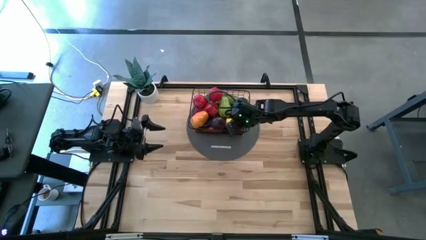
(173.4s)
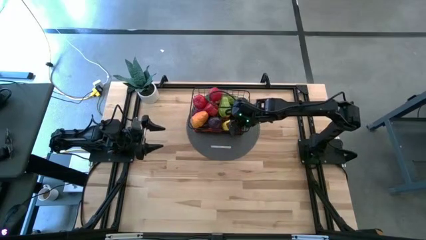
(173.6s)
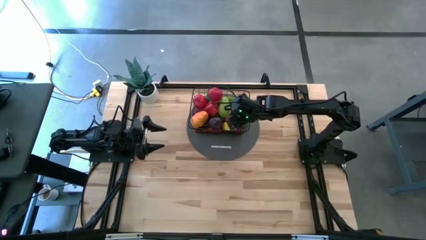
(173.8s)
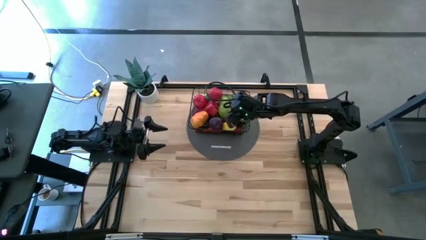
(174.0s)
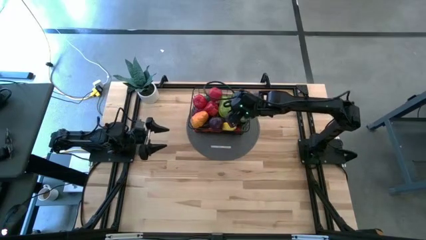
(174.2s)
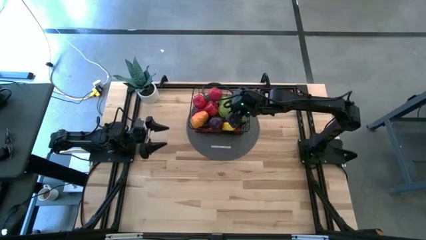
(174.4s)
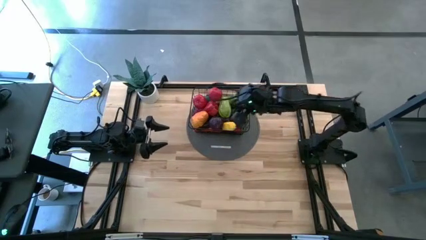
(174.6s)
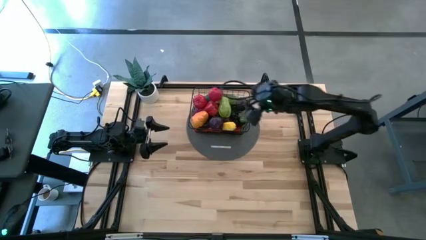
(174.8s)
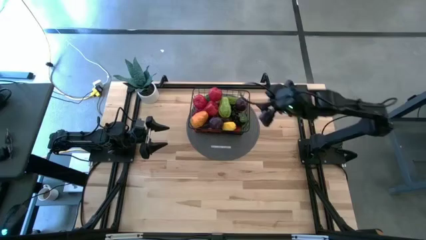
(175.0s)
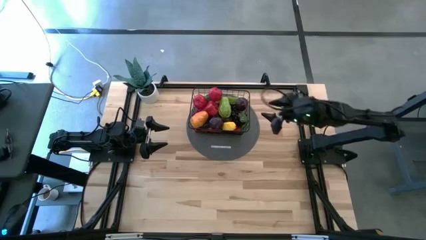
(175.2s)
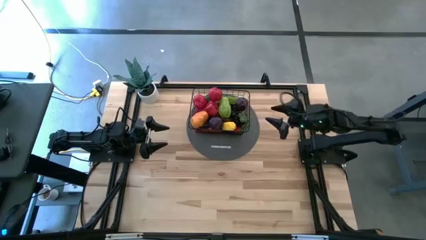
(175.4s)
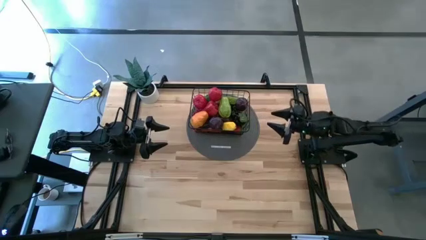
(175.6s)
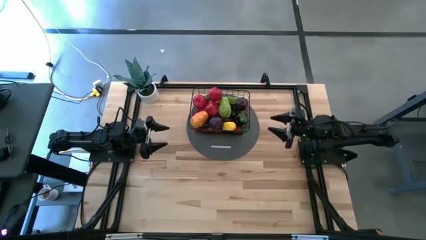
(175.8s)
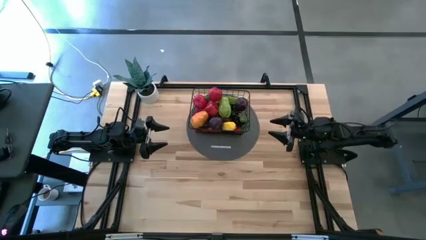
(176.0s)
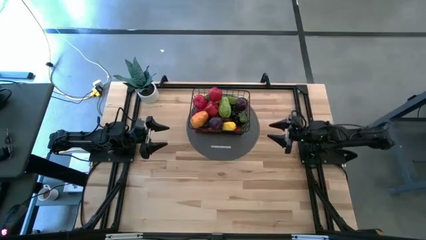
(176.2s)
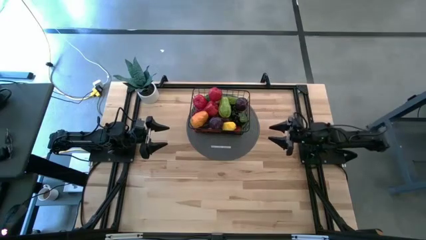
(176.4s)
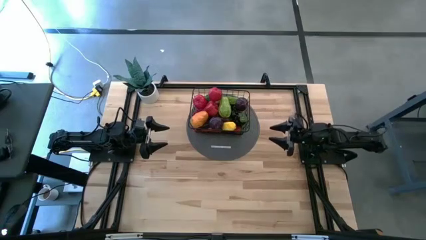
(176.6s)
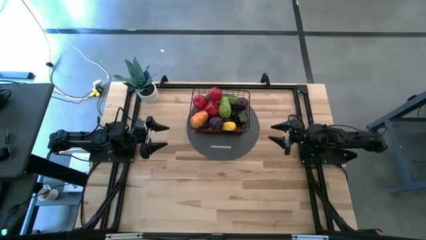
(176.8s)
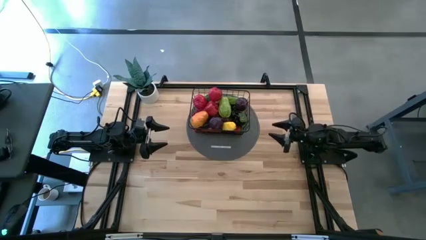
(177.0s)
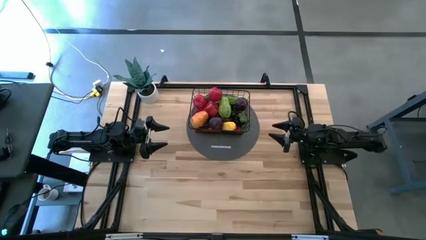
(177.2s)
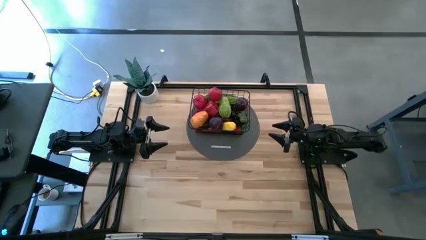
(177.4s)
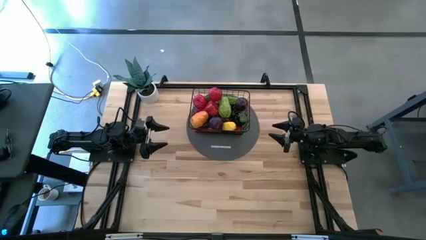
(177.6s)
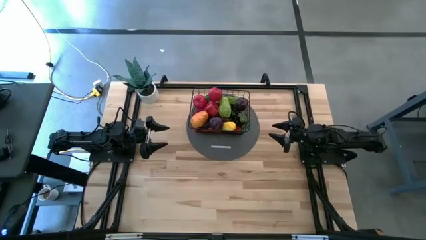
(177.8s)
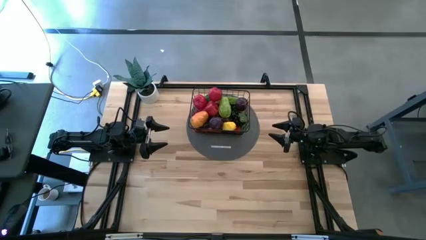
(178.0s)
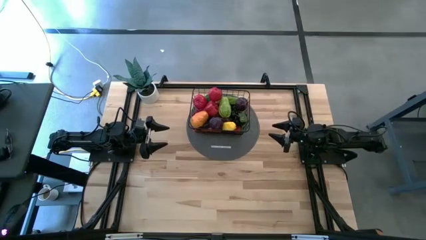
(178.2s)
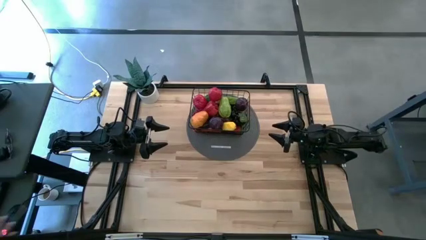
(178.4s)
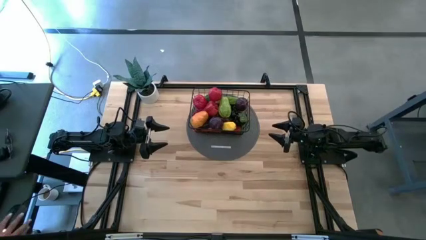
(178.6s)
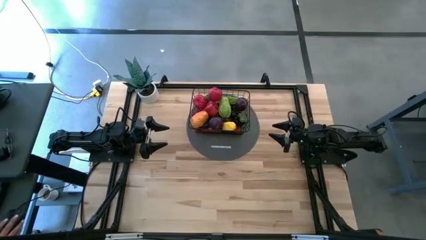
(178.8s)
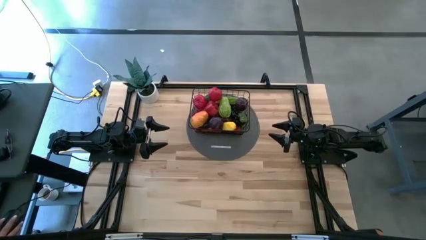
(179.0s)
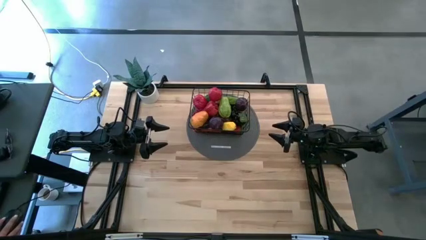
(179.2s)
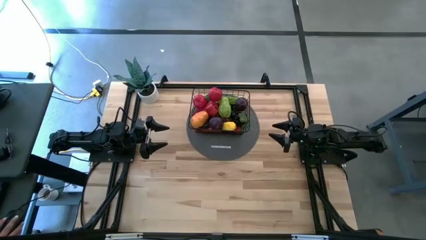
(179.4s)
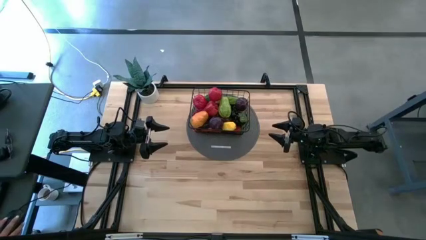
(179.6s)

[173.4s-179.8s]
Task: Build produce basket
Return to Home Position

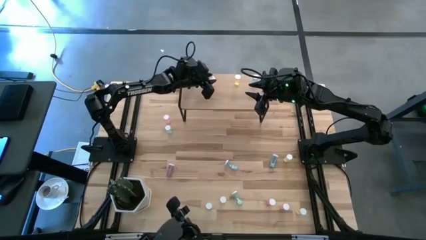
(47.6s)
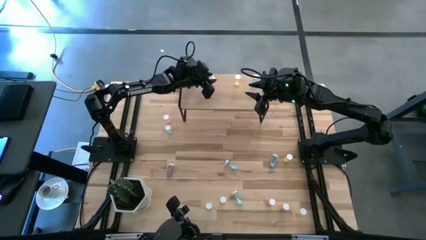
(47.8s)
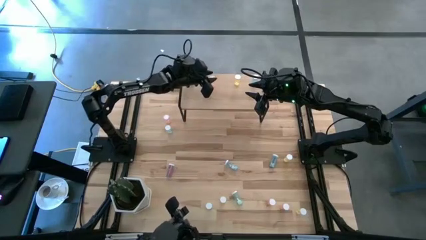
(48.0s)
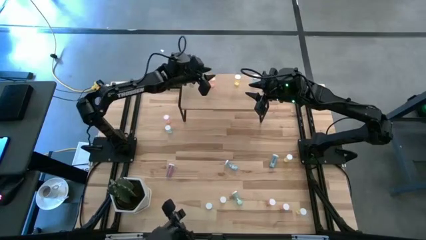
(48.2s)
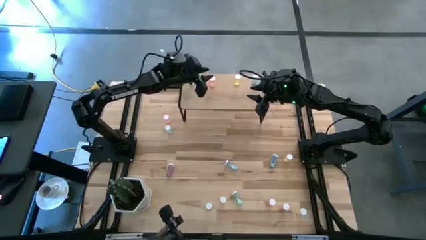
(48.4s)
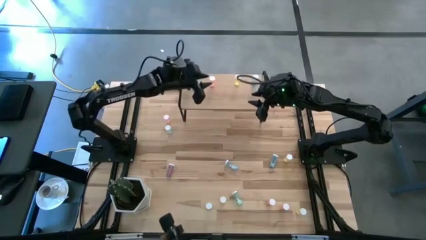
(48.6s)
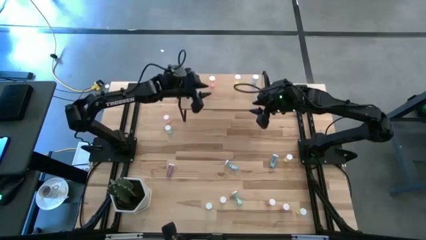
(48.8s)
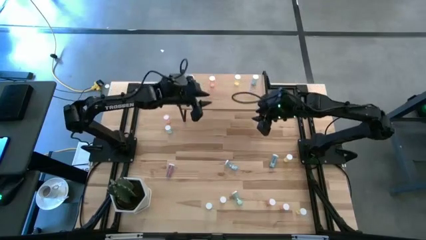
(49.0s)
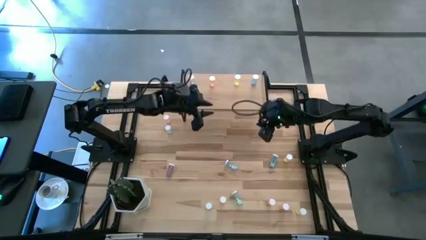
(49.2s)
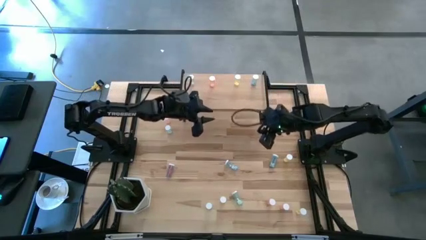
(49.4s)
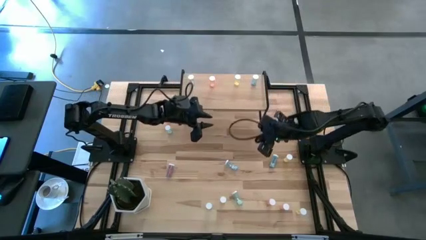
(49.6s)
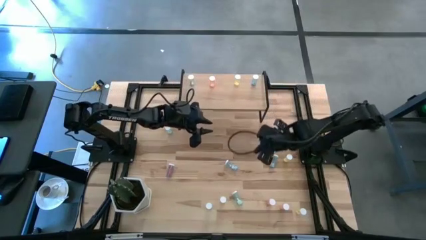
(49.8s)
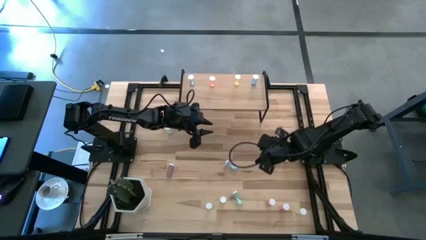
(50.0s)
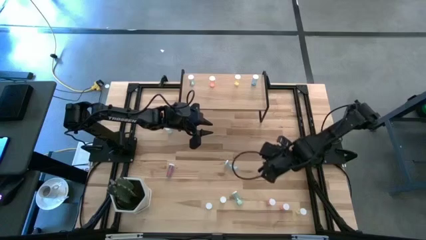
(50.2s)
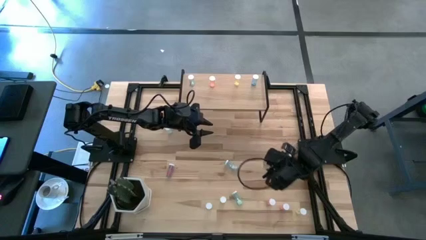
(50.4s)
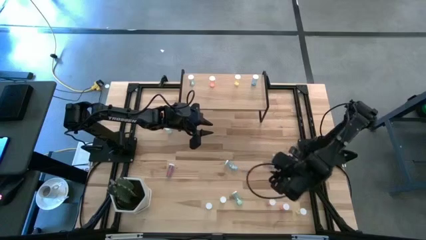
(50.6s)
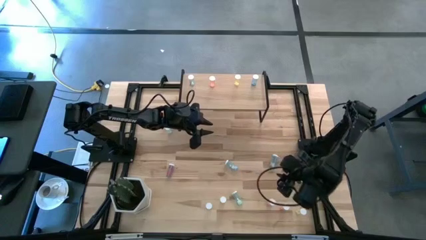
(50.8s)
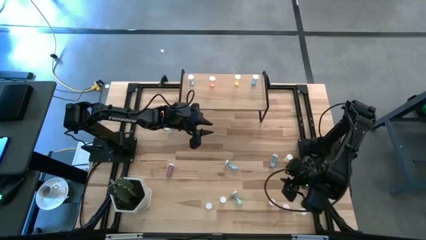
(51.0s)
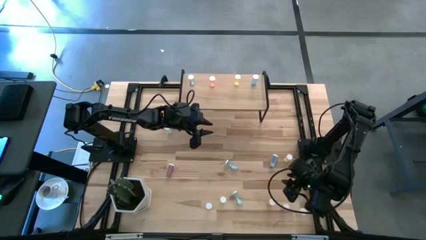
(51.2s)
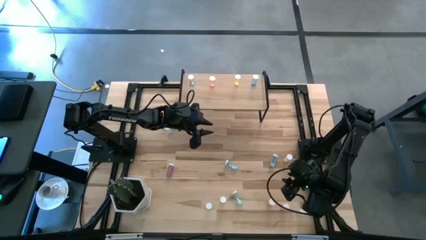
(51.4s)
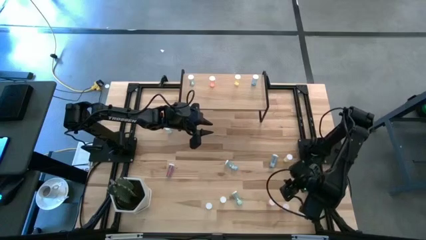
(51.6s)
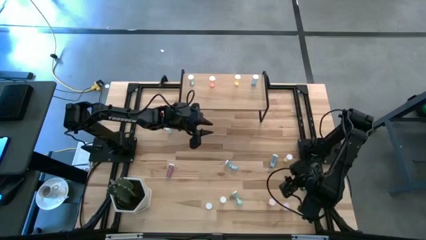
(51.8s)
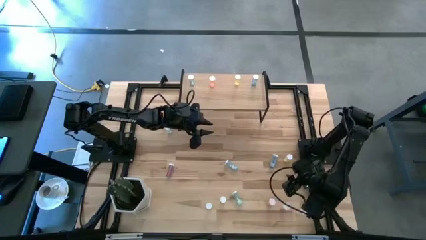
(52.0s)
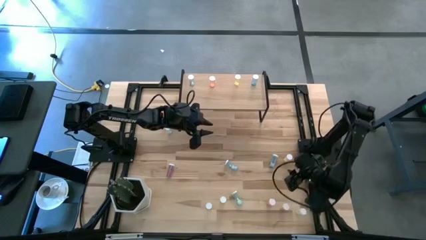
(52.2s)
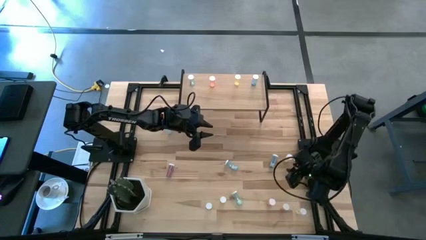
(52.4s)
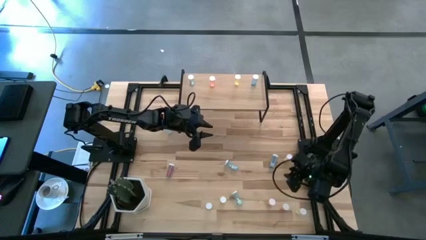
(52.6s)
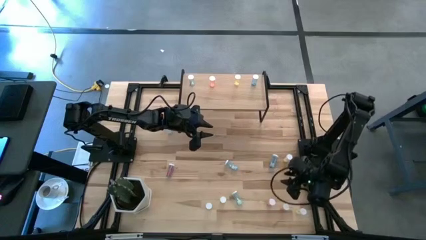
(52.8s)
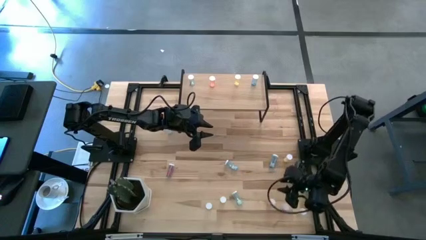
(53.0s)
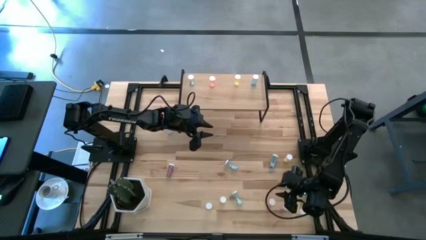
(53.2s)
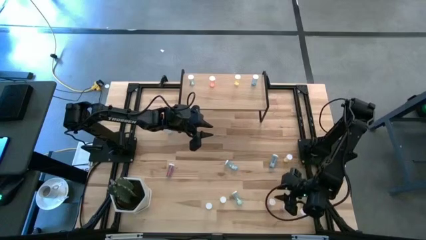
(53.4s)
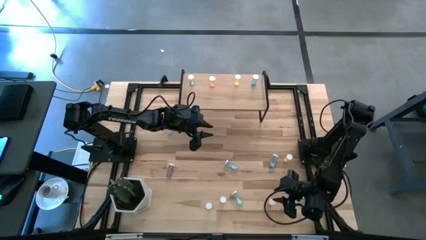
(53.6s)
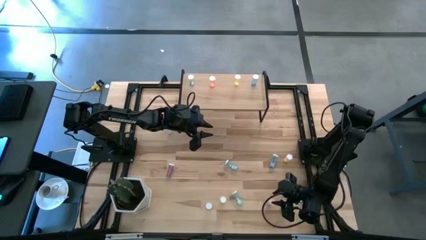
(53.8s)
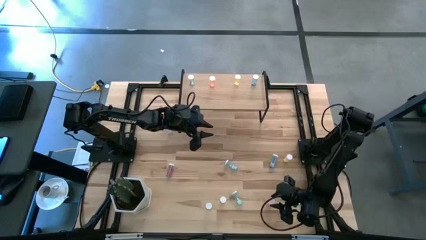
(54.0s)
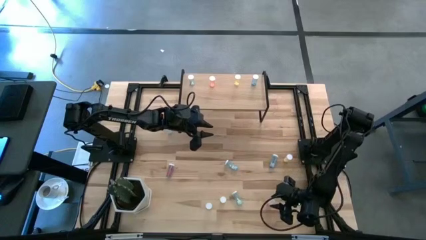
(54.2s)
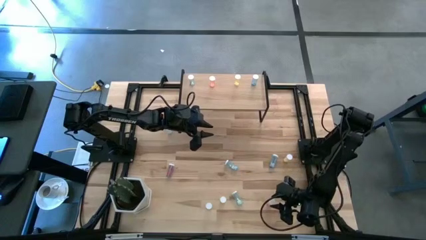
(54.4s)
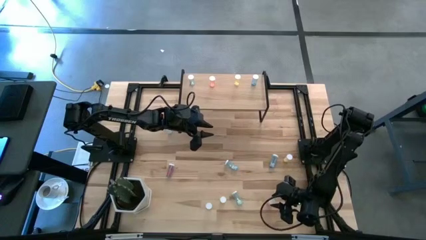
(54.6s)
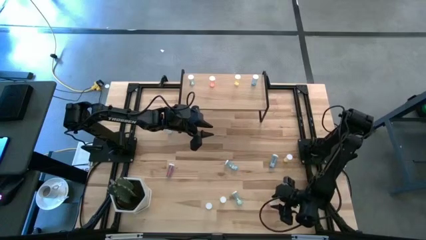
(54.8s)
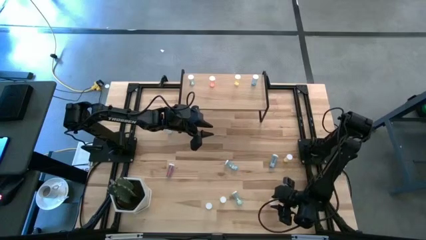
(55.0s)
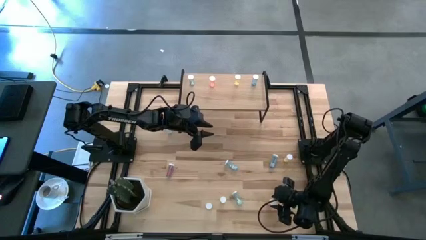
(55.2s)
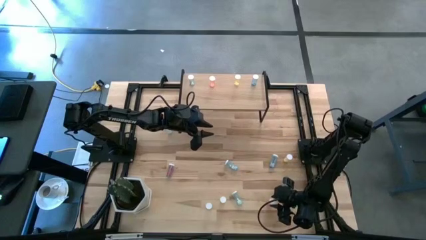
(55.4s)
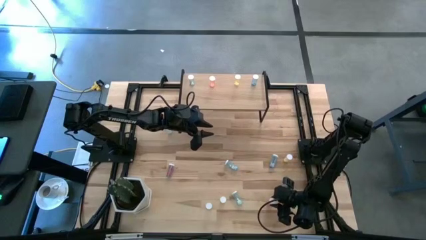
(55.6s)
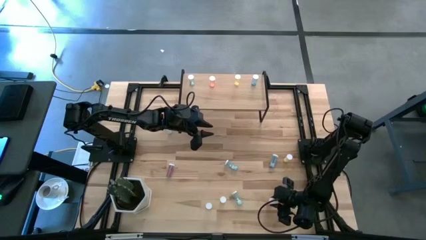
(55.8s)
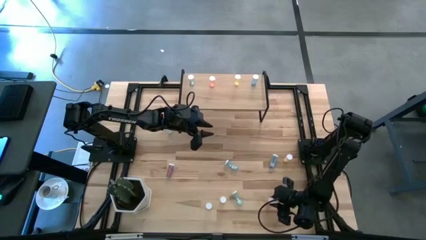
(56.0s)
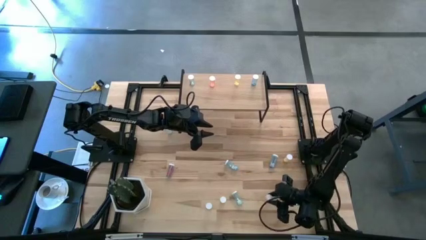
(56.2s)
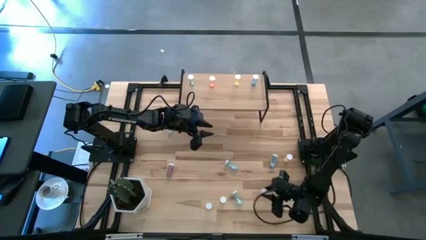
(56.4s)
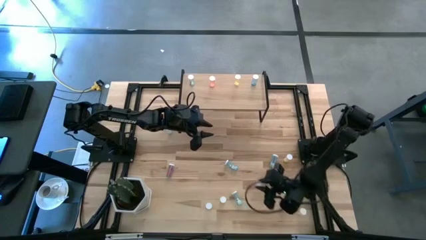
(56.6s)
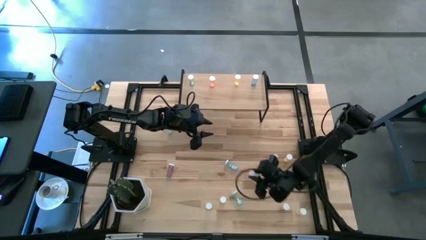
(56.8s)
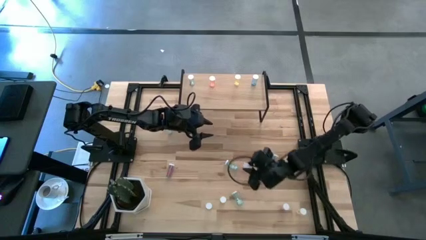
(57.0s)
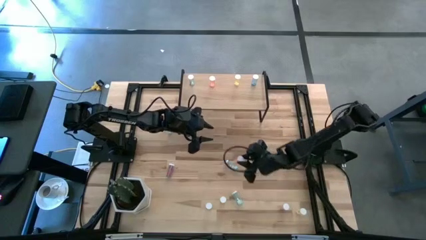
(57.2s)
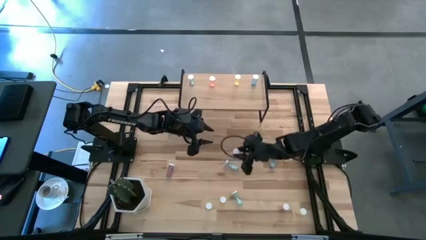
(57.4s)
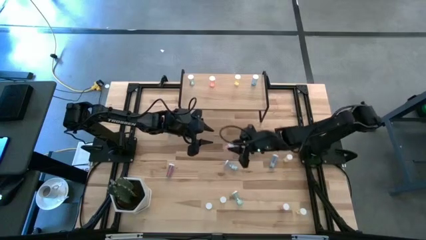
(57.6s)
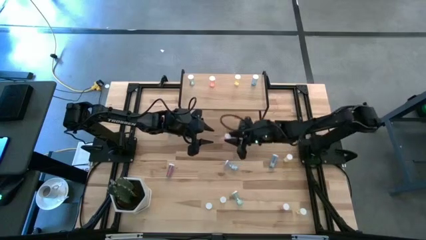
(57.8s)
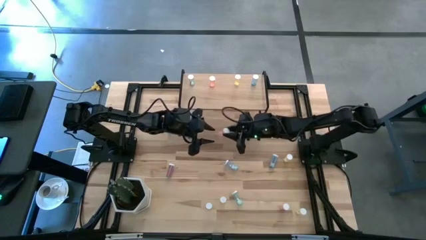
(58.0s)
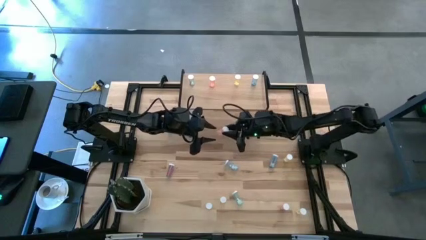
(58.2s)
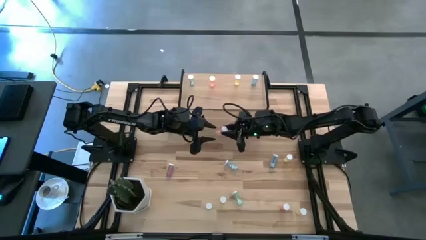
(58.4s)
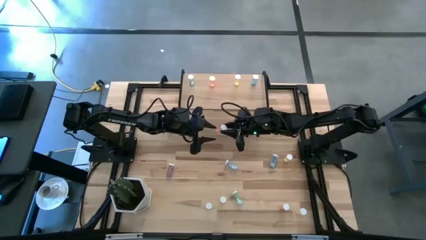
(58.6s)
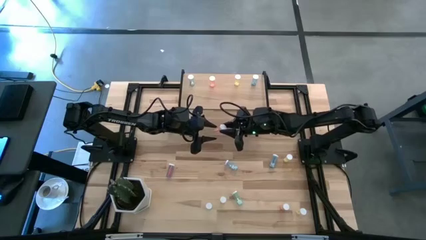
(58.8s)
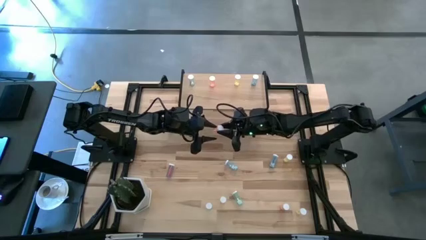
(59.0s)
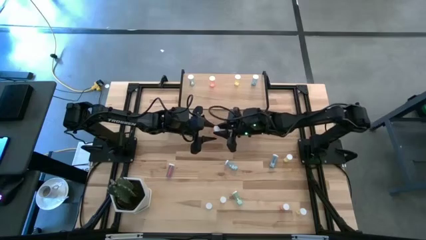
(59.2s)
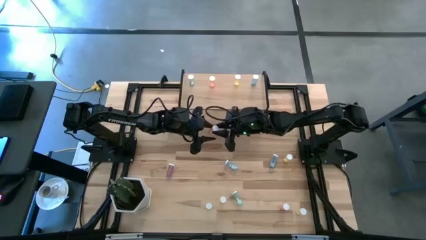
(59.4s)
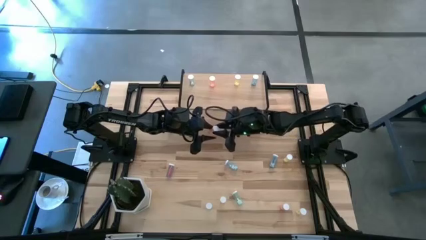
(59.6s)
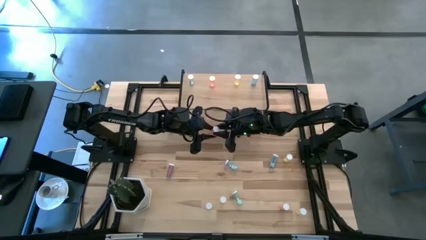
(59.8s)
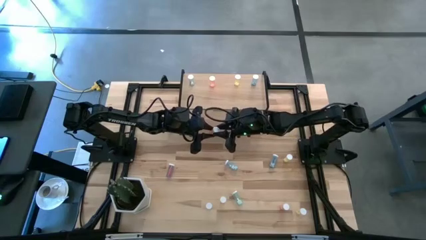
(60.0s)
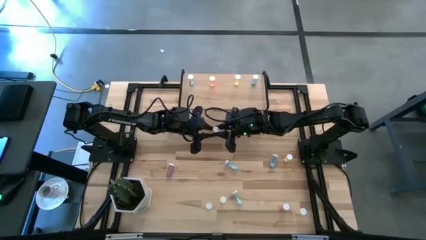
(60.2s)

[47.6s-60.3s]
Task: Pick and place medicine bottles onto shelf by color
Align the pink pill bottle with the pink bottle on the shelf
